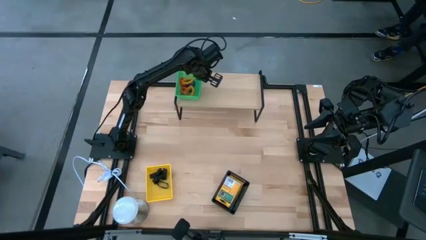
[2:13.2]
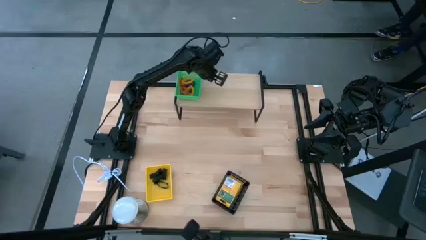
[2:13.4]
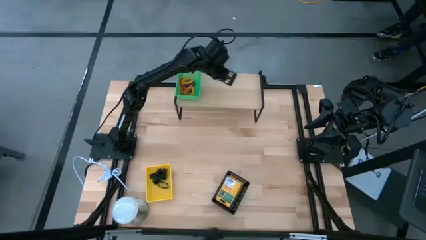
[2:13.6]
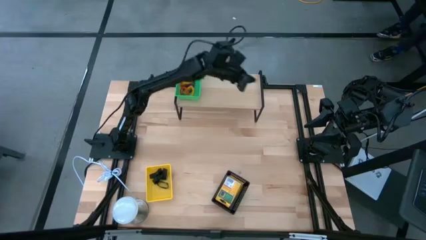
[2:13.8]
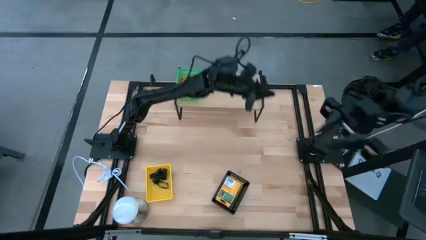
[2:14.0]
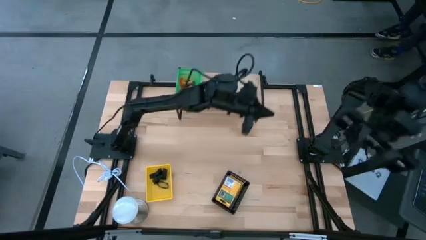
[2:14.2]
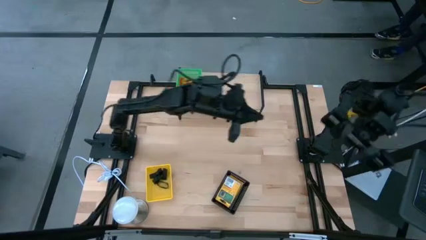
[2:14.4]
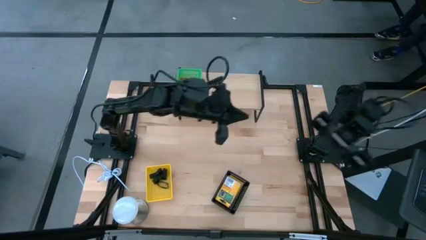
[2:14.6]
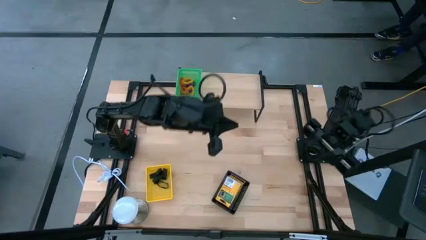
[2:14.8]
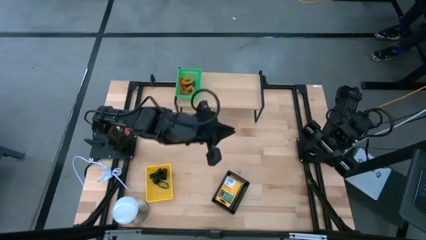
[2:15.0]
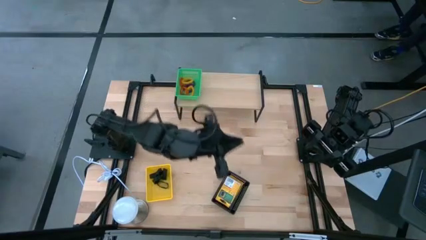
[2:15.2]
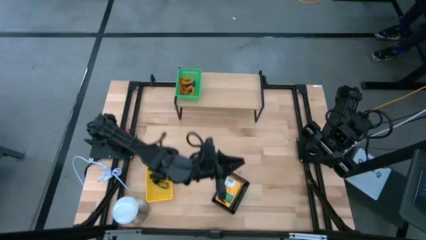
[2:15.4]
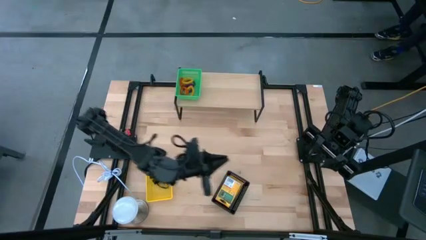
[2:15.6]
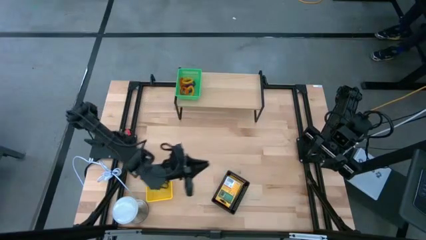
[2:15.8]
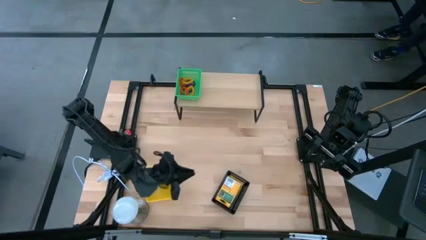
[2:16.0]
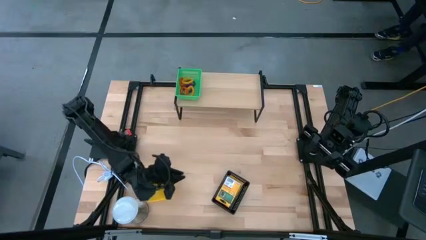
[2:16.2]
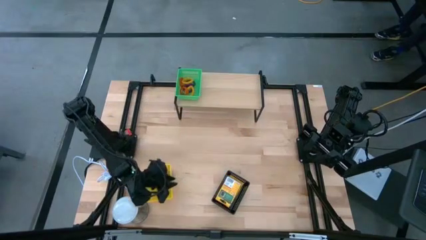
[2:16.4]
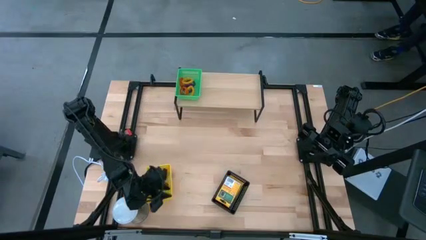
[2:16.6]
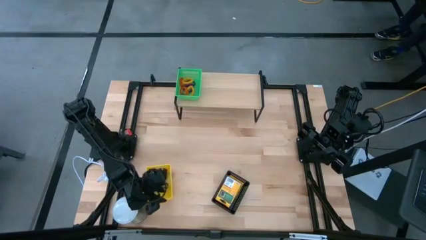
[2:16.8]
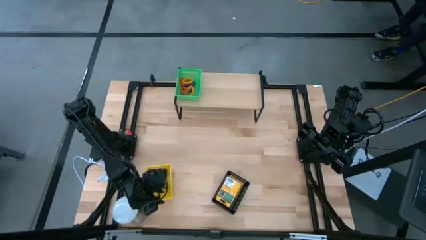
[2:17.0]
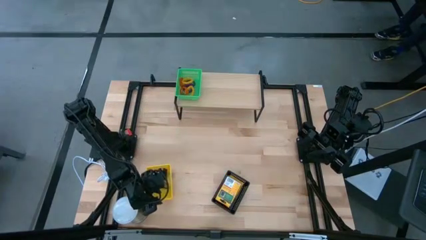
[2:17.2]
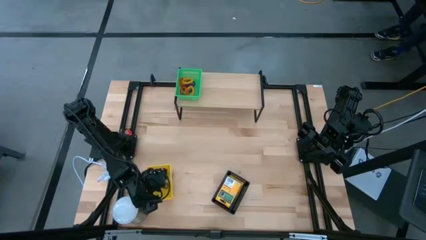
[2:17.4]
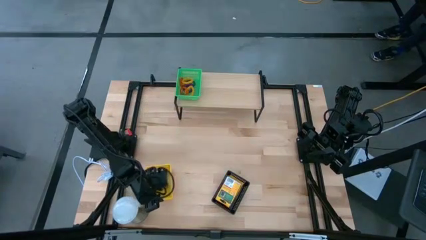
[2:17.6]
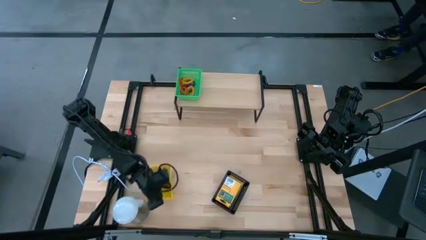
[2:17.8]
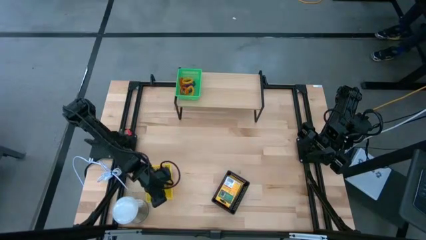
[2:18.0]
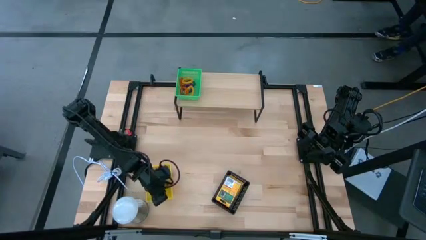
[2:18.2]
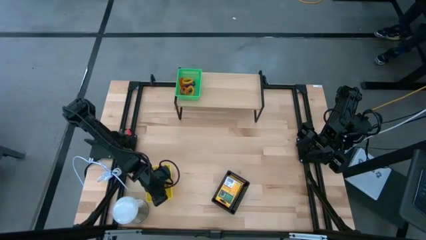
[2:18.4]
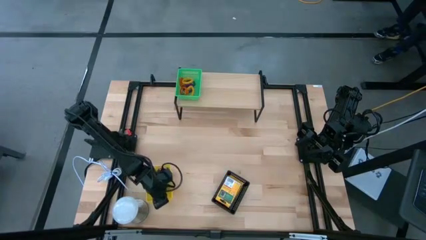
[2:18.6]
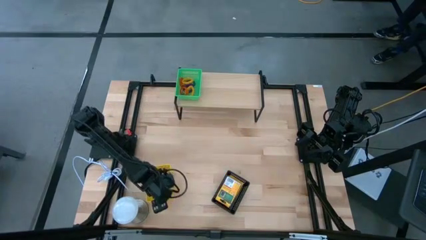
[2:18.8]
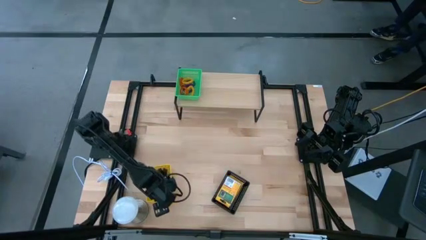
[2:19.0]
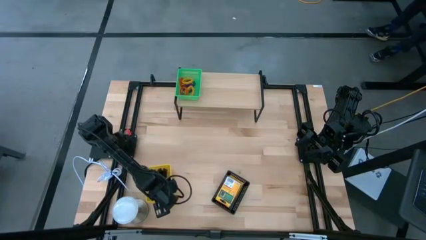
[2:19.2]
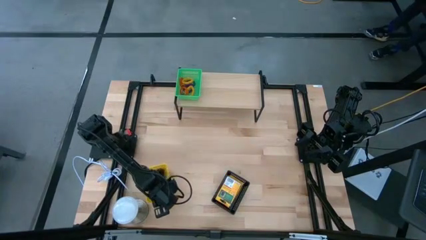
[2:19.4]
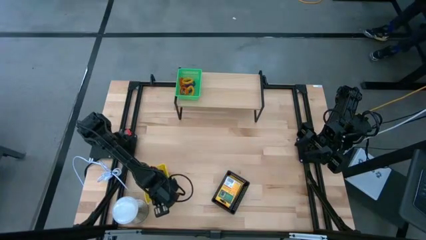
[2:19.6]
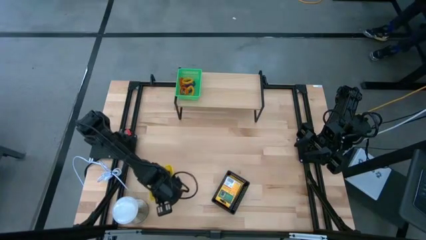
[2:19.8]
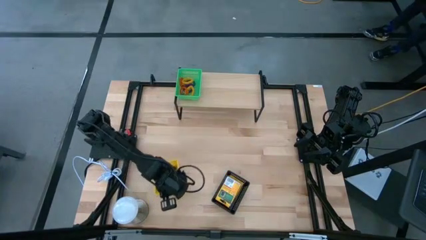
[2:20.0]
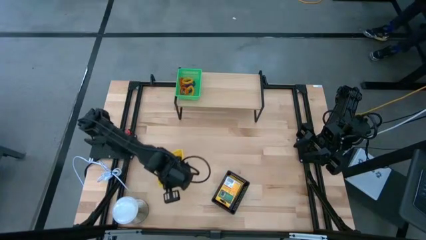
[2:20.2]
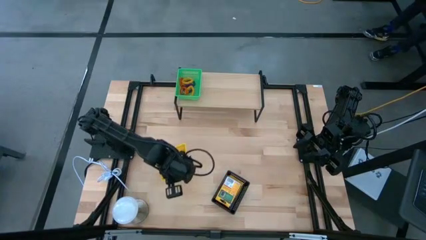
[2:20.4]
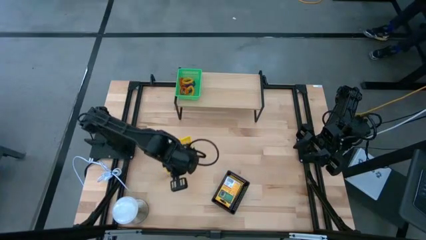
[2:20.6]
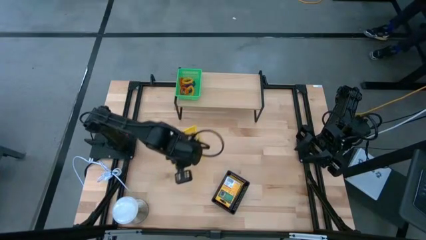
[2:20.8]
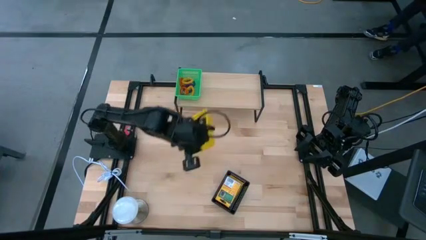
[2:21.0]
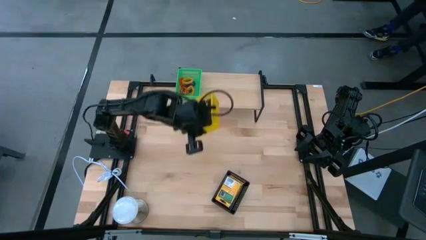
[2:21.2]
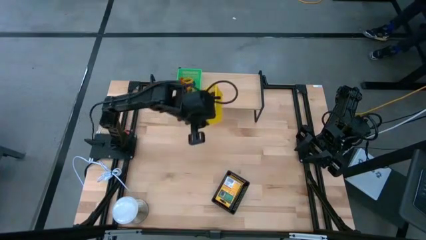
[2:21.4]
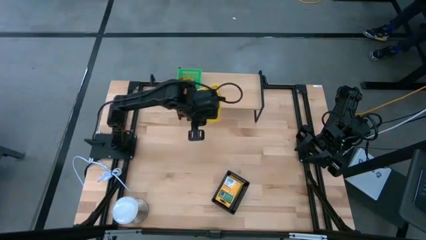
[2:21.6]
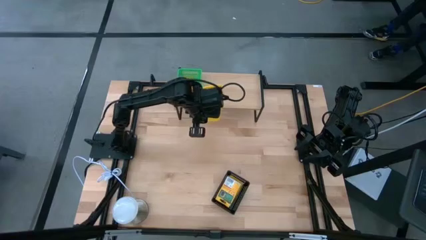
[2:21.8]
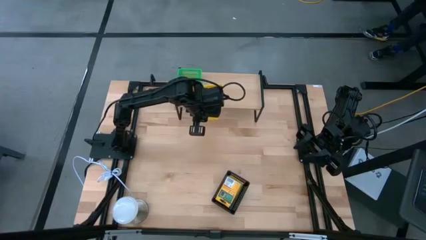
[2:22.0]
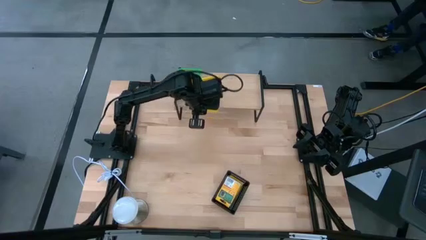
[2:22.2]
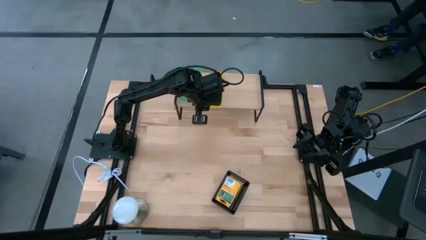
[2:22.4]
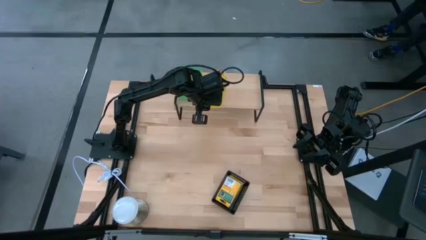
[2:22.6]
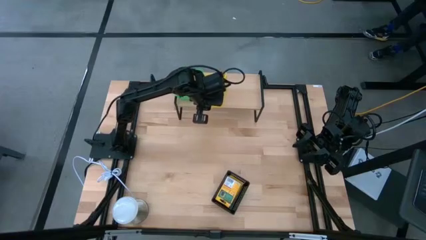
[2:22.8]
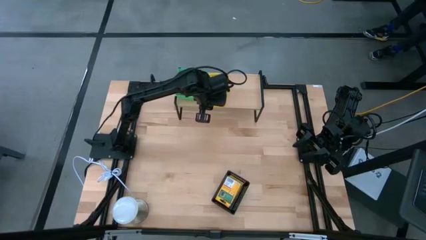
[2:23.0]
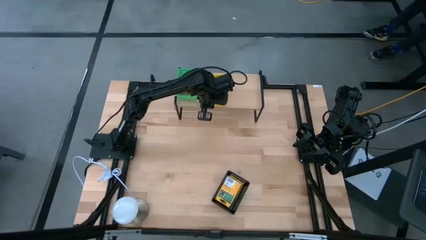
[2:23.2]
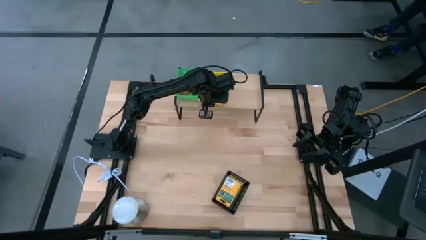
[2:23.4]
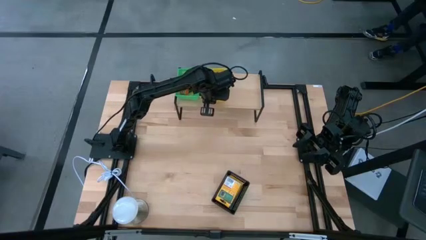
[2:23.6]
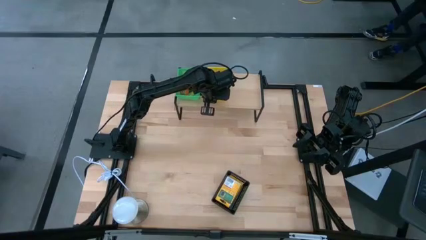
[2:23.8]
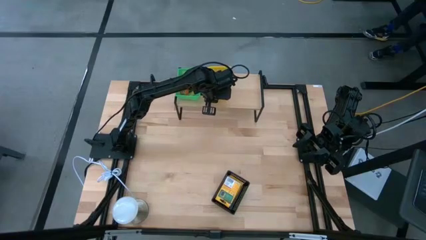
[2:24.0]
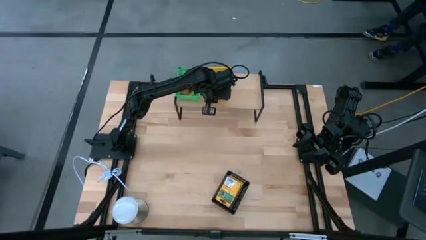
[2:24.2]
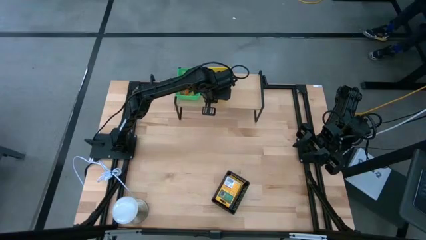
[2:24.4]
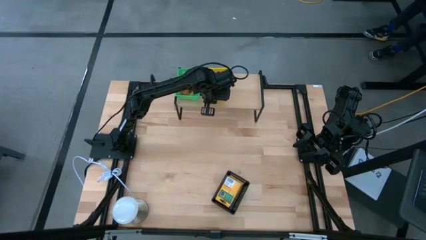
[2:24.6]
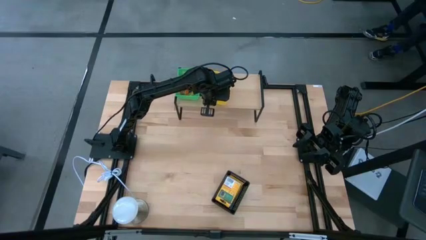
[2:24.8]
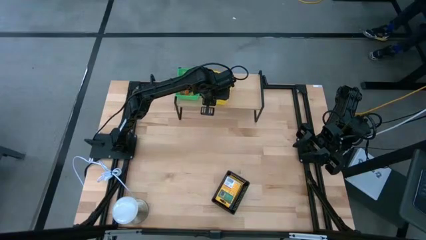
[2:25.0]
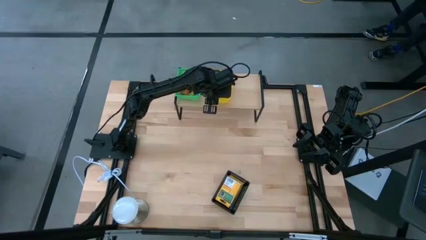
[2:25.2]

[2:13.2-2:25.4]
Task: Pick & Place Office Desk Supplies
Put the yellow basket on the shelf

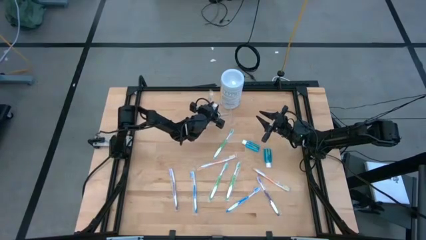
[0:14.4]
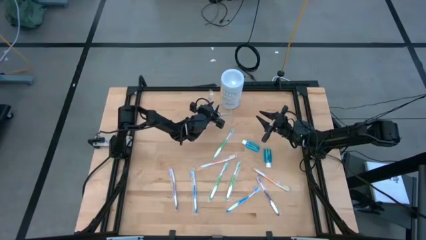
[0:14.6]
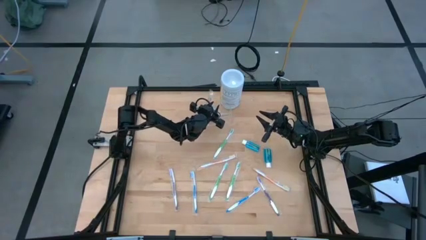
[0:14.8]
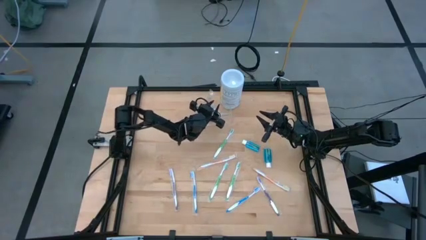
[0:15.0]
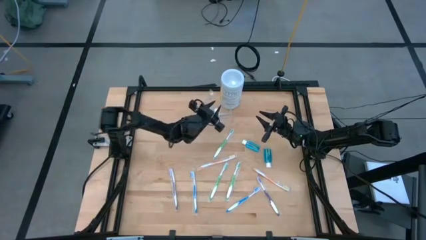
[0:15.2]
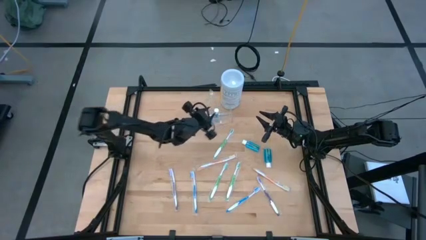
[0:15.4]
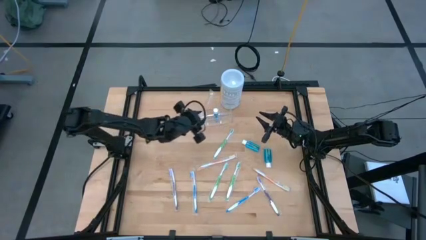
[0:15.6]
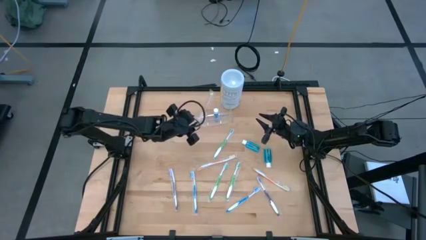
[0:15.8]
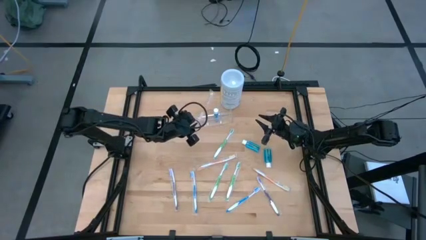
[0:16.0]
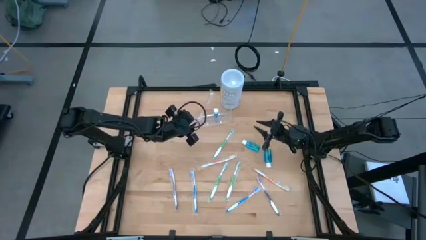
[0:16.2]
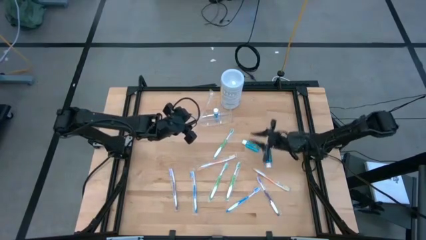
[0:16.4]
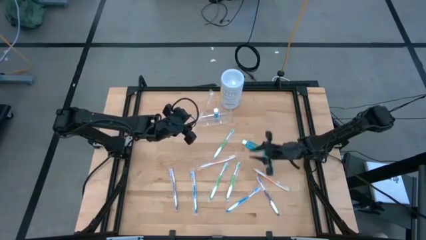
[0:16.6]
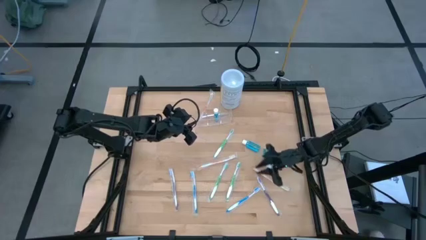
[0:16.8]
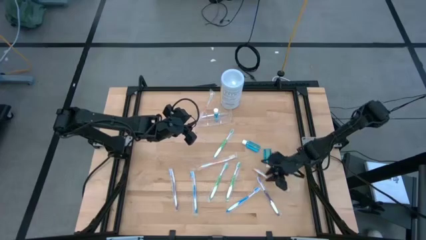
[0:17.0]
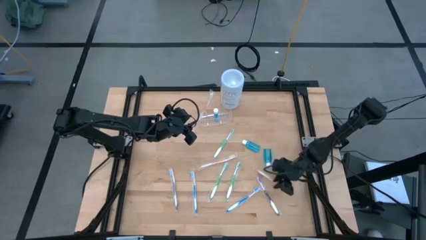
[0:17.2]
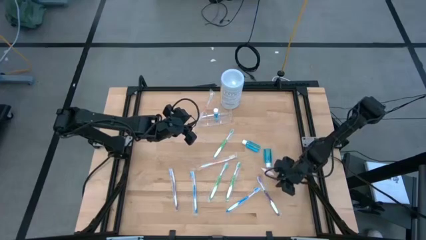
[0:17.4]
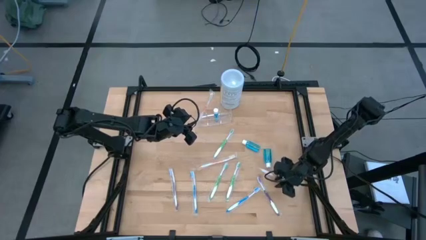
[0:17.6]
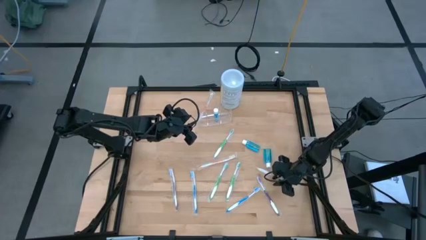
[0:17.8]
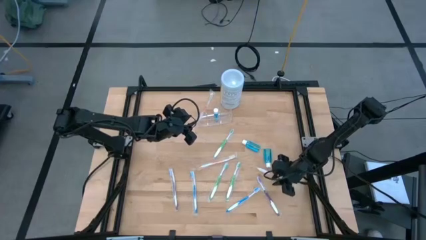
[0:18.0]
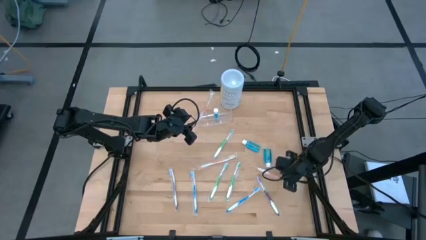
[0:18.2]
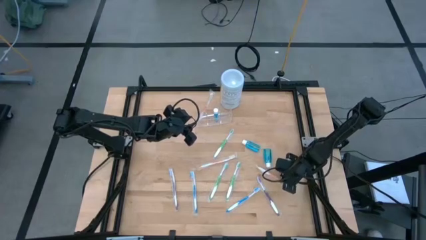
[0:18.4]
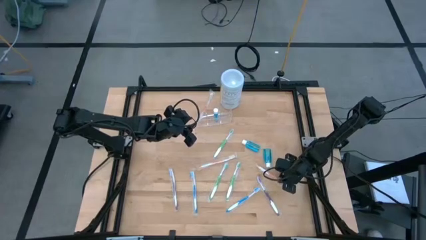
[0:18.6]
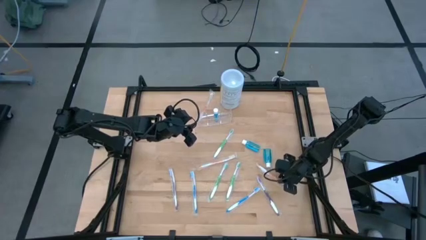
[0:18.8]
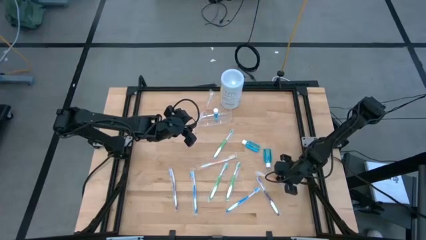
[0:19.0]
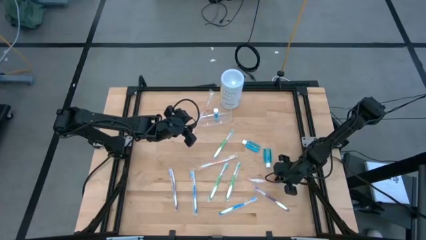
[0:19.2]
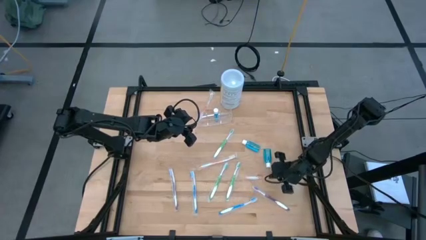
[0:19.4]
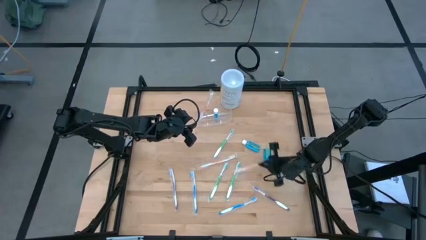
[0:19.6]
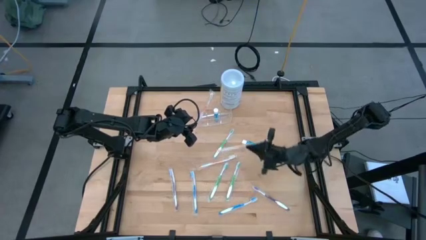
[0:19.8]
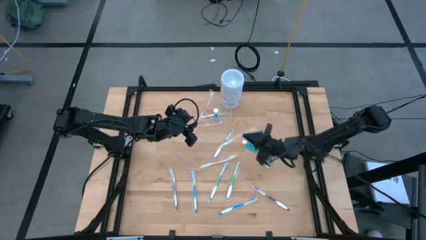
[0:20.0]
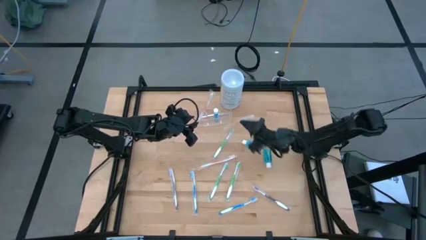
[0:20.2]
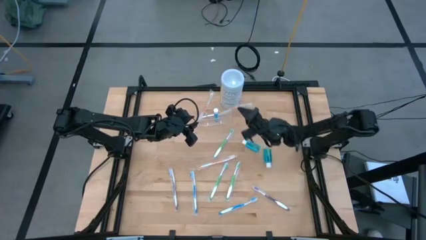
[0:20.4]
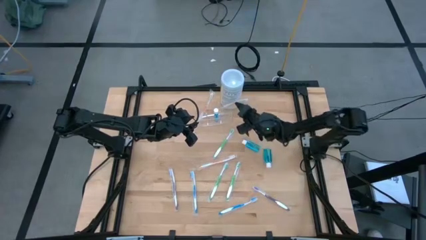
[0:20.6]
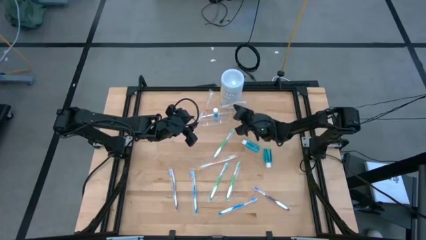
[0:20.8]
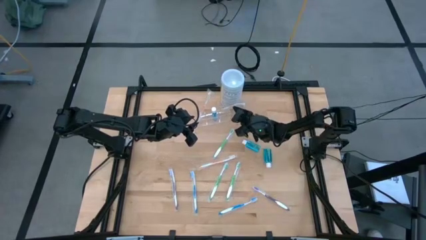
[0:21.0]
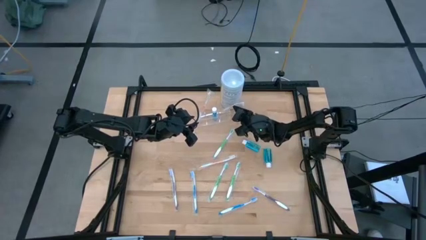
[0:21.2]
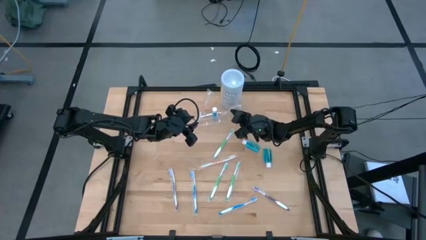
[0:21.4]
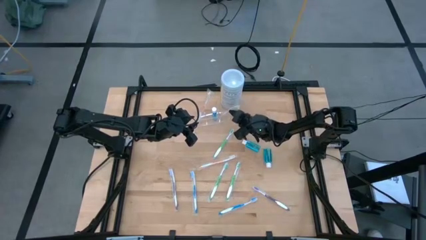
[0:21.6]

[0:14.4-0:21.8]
Task: Pick & Place toothbrushing station
Put the bottom orange toothbrush into the transparent organizer
